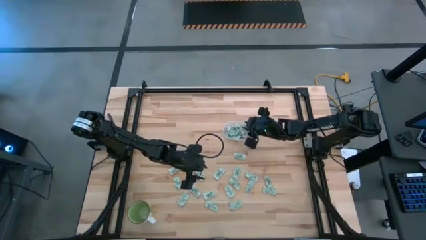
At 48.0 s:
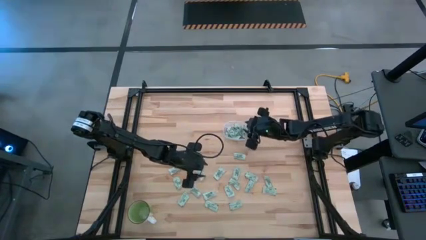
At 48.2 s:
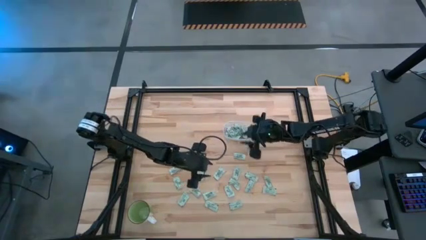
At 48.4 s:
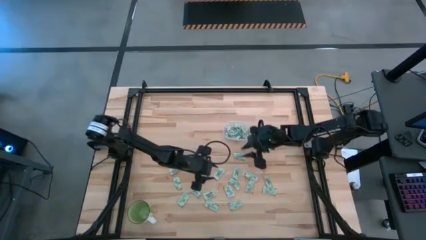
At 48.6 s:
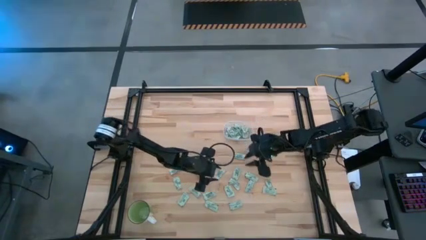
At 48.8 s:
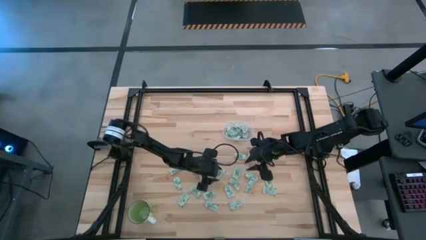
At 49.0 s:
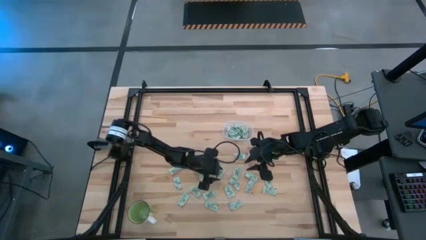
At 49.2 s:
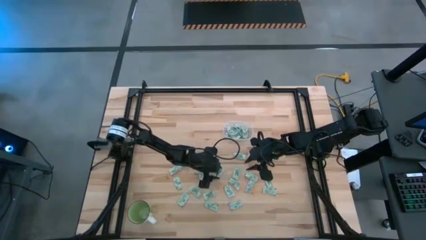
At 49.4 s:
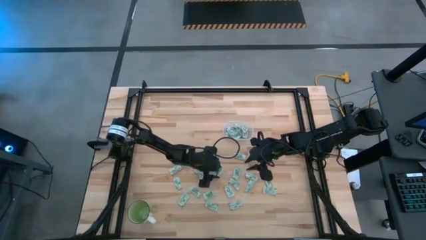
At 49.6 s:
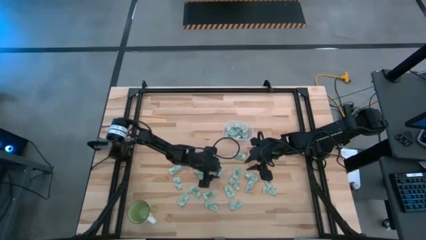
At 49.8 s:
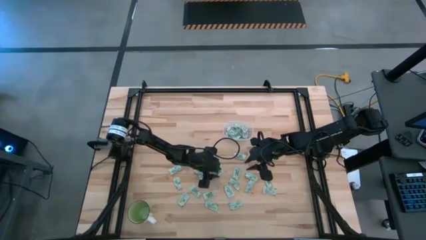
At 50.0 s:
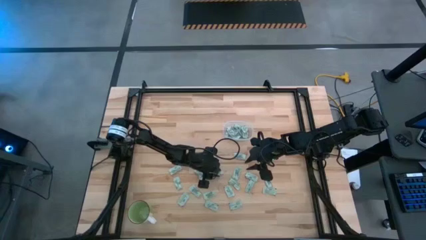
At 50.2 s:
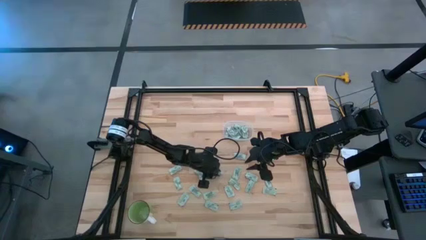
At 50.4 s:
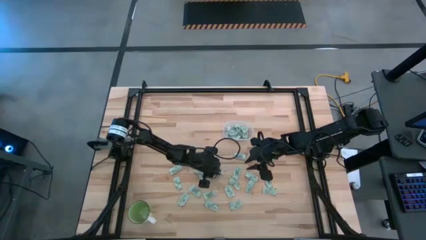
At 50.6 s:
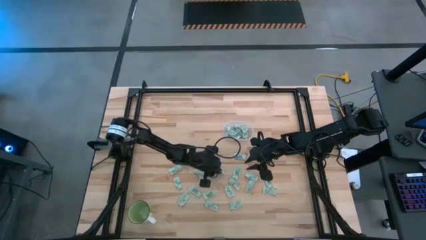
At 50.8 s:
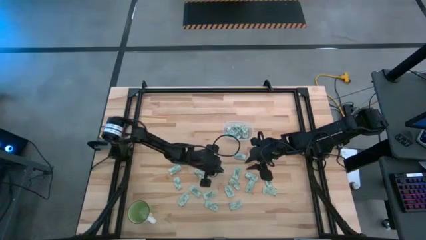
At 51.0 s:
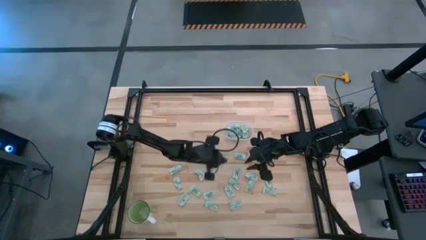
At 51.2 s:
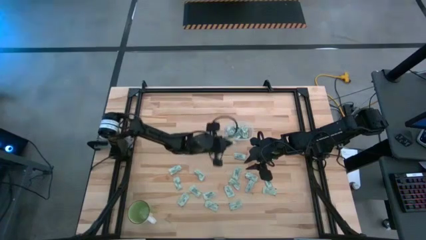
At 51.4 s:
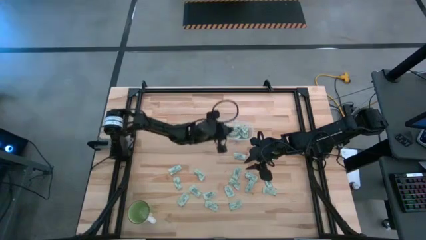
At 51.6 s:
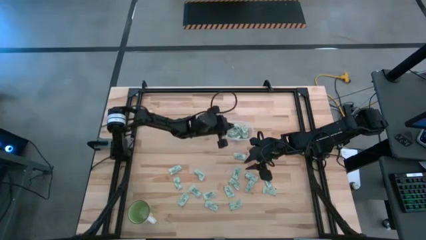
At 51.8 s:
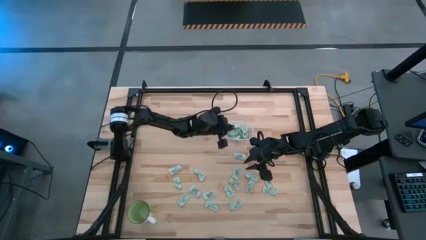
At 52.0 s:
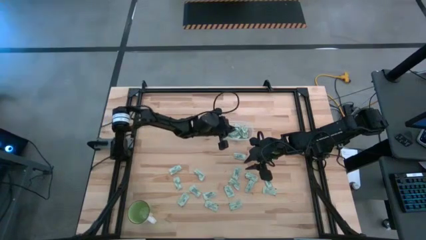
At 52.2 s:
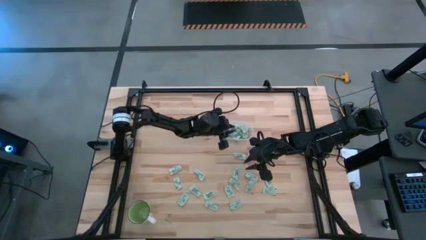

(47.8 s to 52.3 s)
Task: Pick and place Stevia / Truvia into bins
Put the stevia packet into the transparent bin

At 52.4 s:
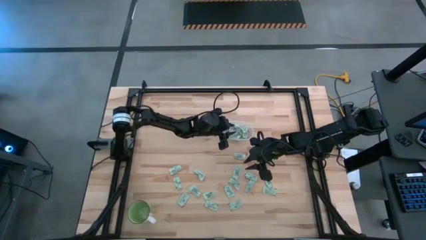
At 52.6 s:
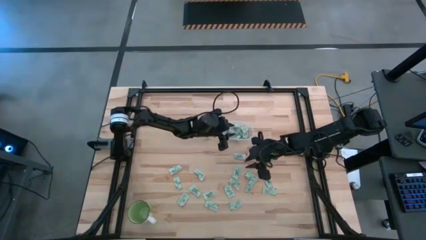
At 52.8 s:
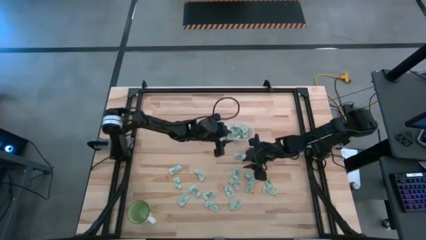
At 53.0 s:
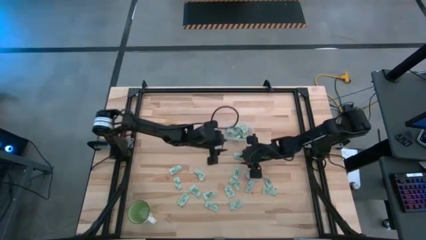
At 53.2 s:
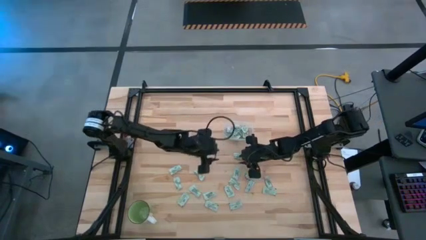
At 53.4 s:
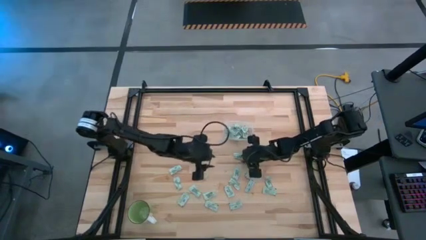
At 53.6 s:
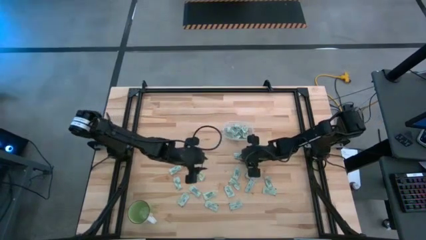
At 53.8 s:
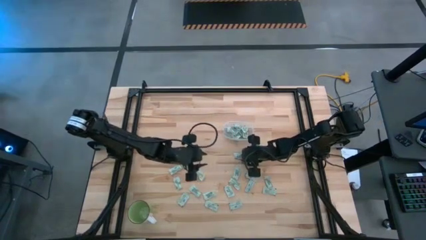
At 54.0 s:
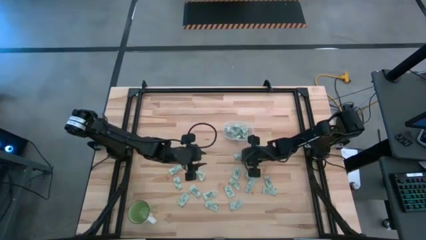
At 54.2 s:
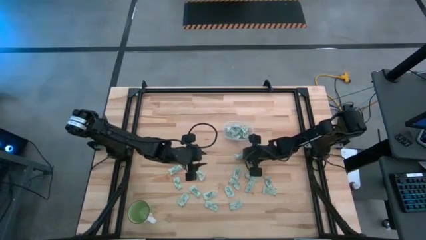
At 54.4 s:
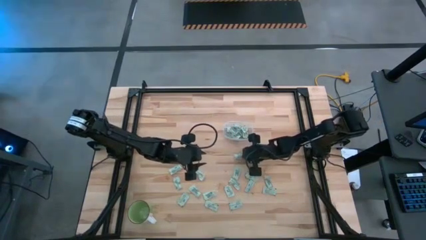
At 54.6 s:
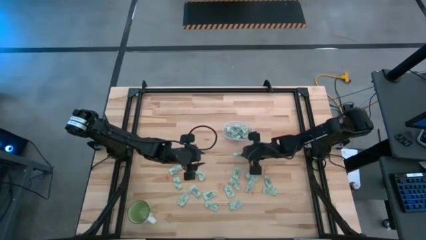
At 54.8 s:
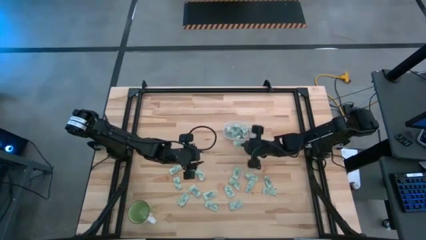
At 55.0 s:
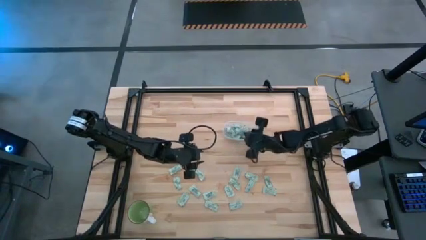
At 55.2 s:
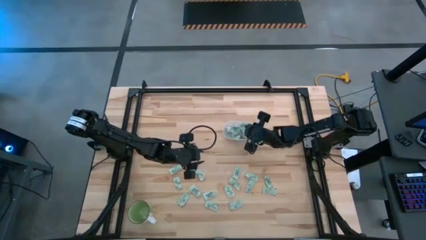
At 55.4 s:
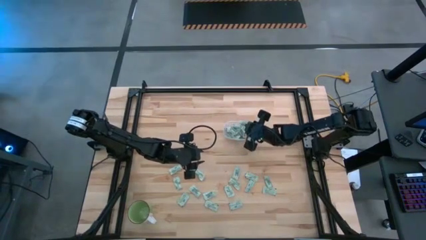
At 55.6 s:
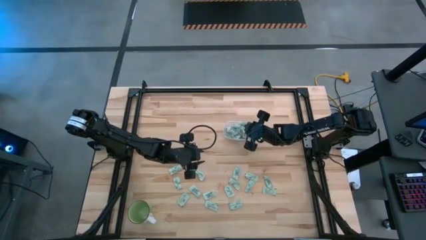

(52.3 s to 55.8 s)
Put the stevia packet into the transparent bin

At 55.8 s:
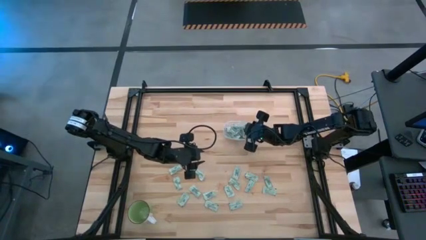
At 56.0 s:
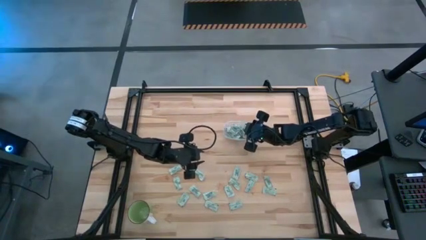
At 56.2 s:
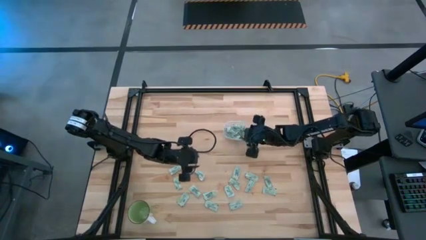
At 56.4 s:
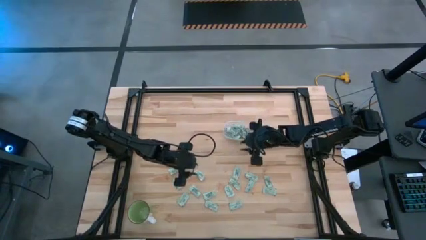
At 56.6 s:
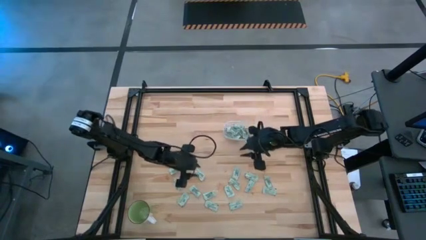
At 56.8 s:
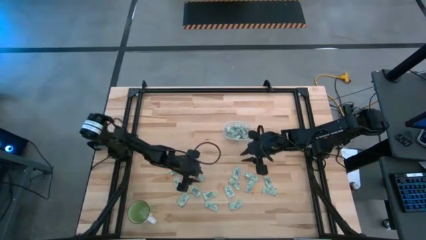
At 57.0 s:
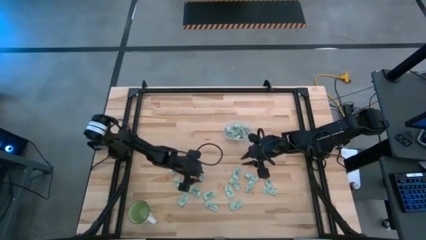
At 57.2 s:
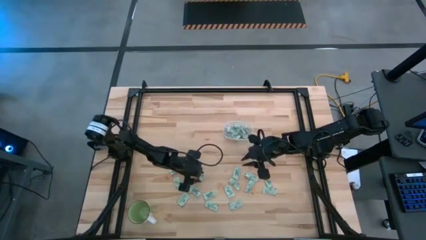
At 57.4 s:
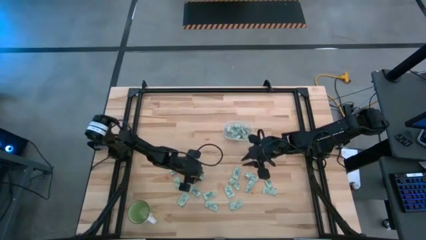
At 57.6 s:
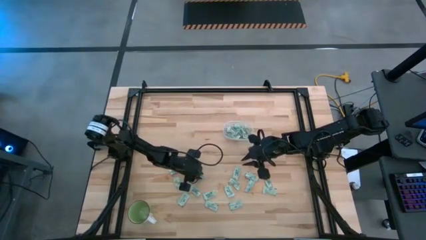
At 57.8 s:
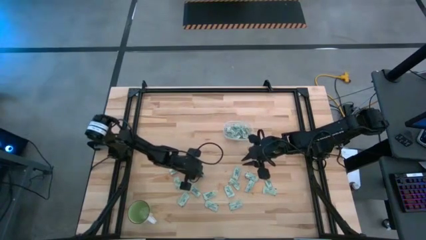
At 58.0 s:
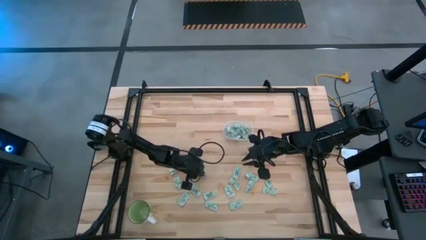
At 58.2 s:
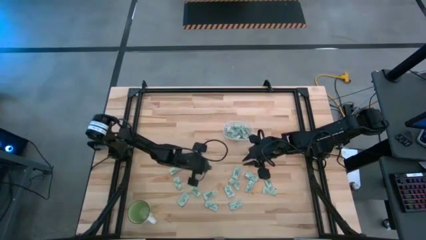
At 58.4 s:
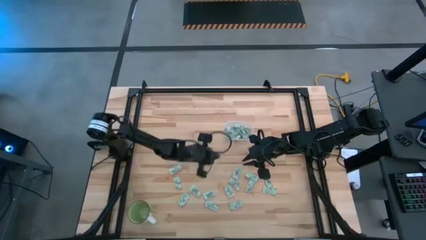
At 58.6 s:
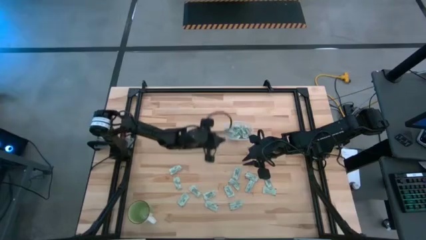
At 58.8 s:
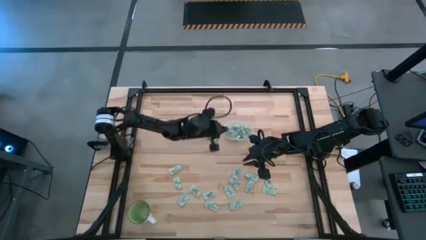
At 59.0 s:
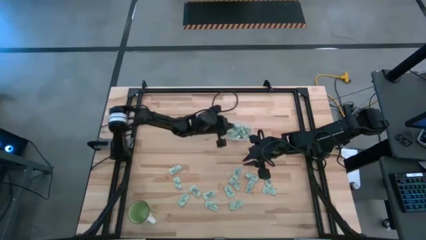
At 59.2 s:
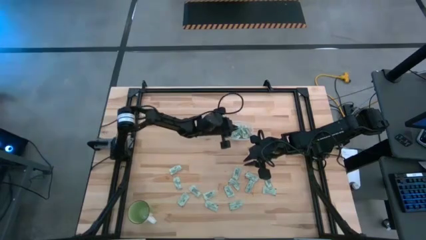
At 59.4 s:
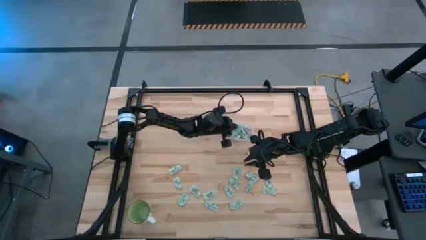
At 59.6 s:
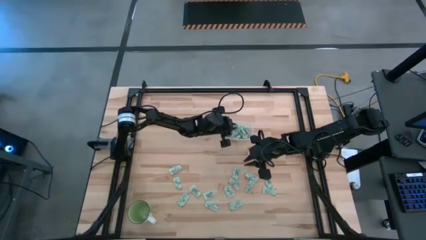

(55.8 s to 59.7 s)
Put the stevia packet into the transparent bin

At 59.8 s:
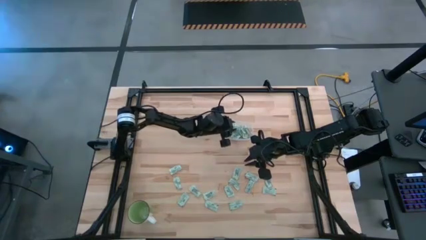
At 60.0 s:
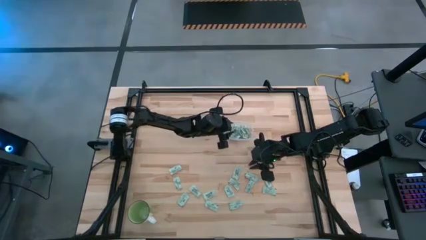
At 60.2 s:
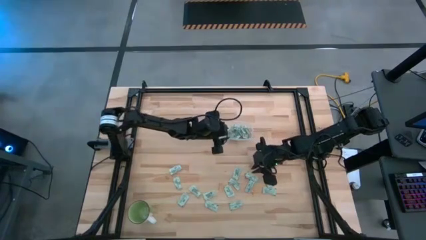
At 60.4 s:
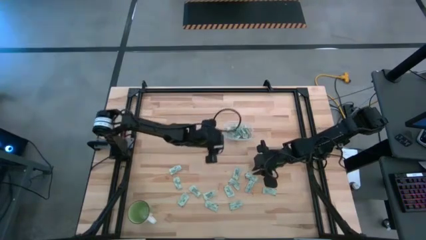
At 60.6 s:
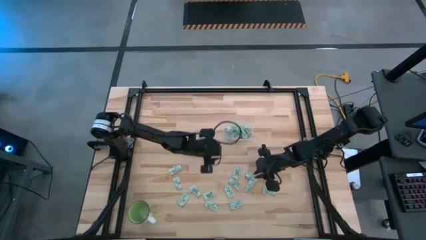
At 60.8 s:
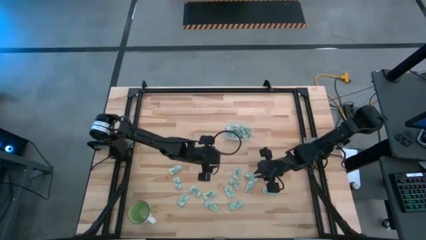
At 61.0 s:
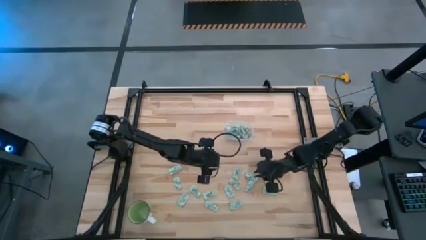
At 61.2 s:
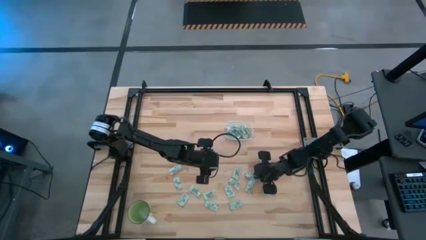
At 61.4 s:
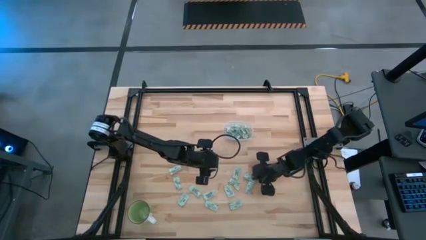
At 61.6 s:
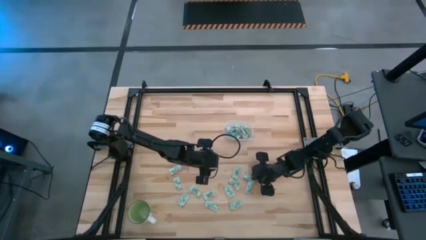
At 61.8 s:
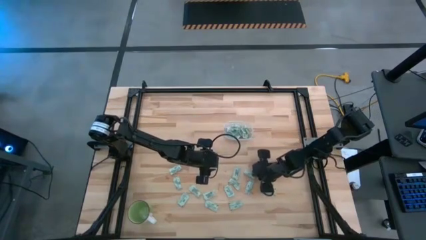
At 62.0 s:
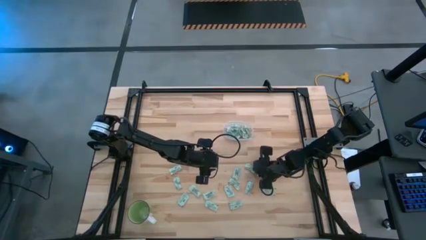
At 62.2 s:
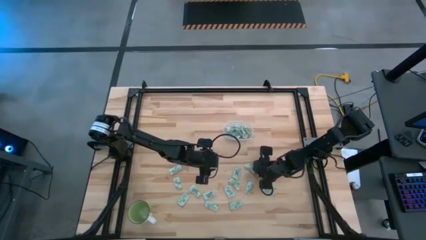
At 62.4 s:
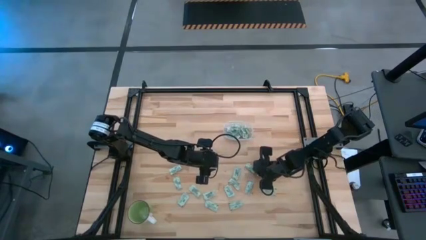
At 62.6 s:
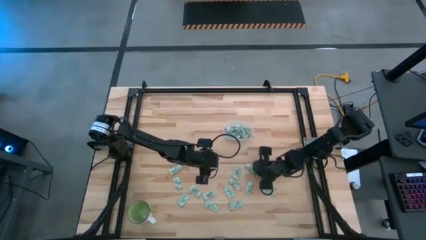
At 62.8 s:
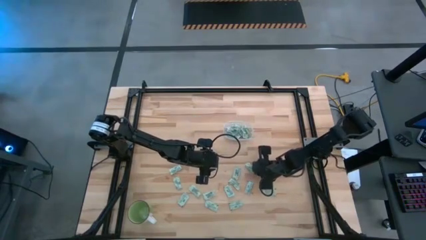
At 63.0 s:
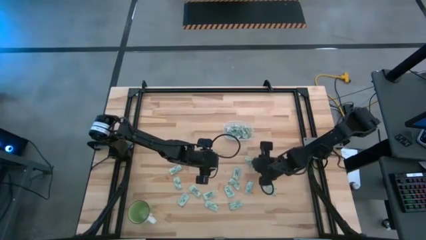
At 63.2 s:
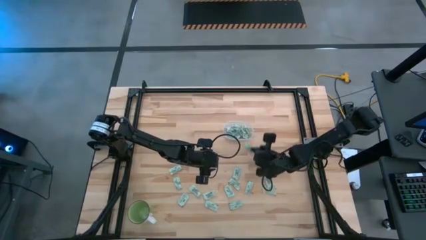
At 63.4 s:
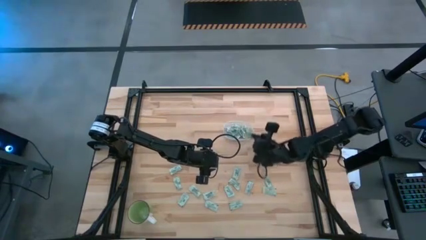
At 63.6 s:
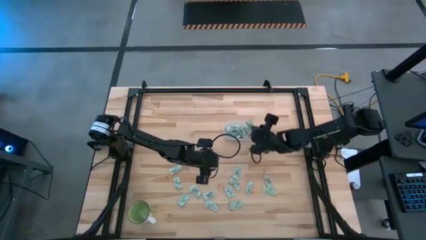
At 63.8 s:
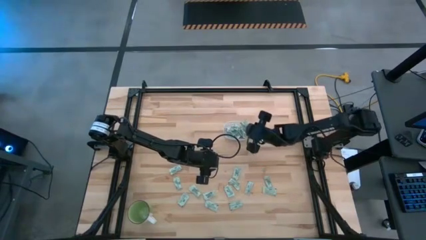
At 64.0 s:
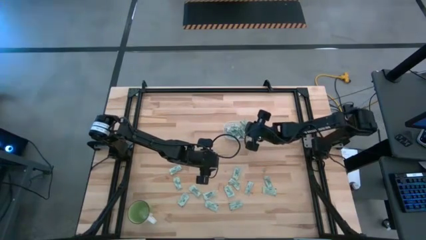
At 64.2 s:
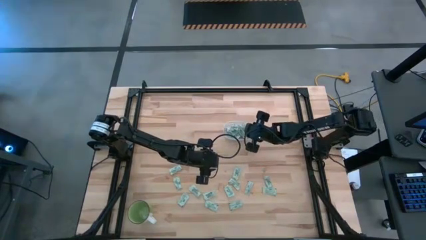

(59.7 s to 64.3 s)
Put the stevia packet into the transparent bin
